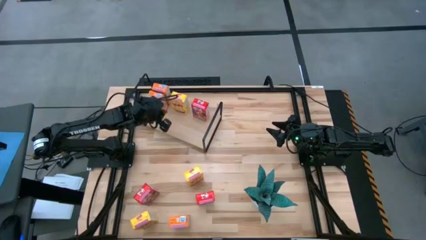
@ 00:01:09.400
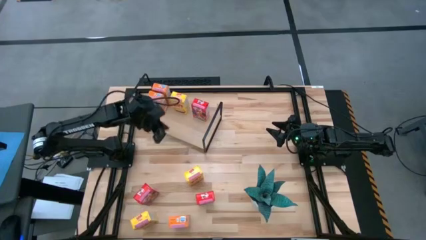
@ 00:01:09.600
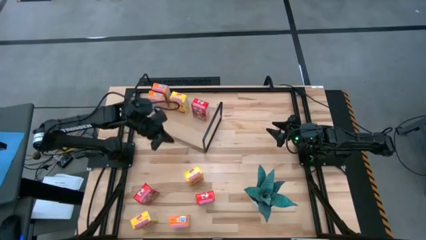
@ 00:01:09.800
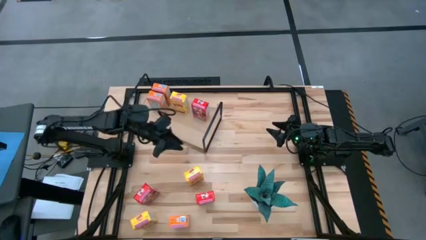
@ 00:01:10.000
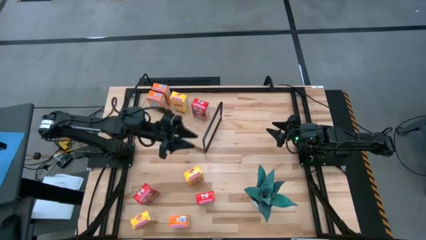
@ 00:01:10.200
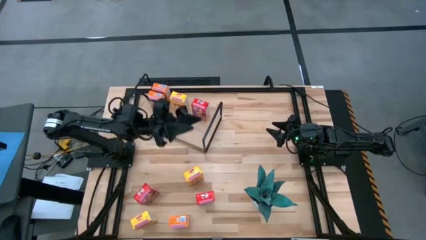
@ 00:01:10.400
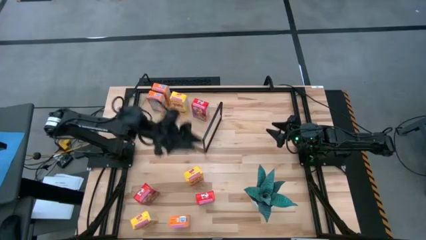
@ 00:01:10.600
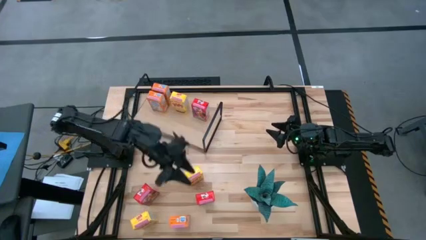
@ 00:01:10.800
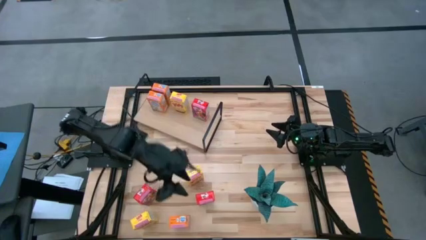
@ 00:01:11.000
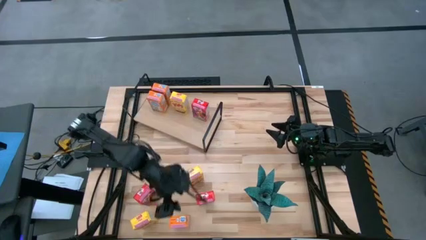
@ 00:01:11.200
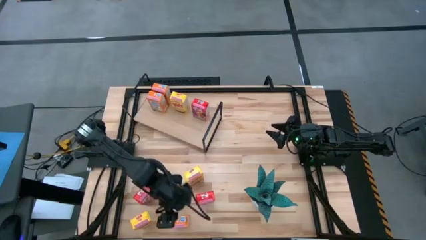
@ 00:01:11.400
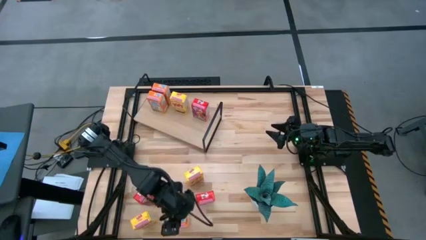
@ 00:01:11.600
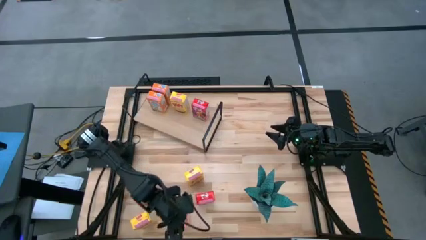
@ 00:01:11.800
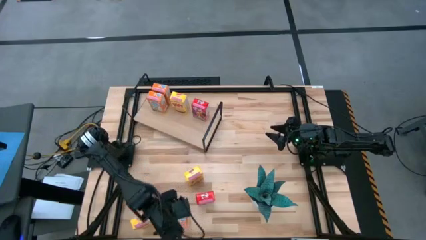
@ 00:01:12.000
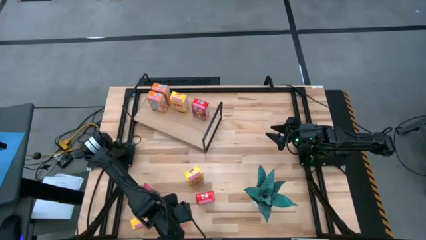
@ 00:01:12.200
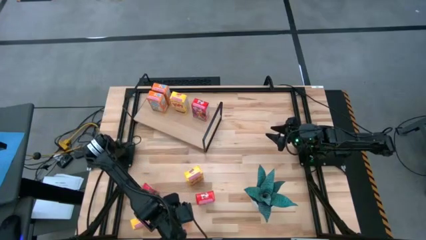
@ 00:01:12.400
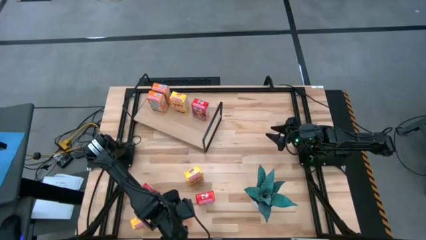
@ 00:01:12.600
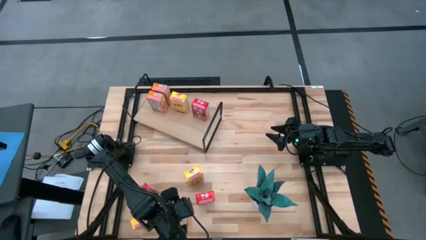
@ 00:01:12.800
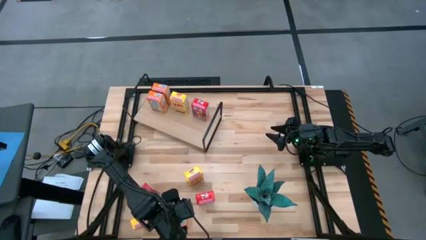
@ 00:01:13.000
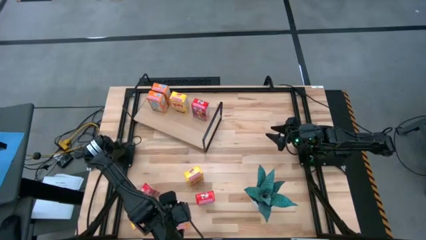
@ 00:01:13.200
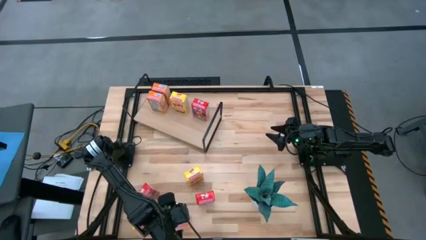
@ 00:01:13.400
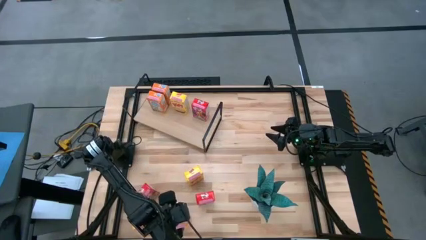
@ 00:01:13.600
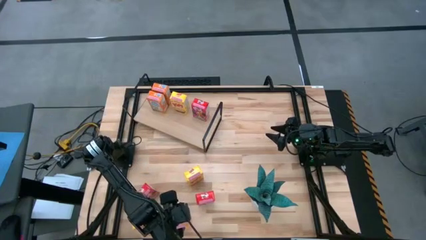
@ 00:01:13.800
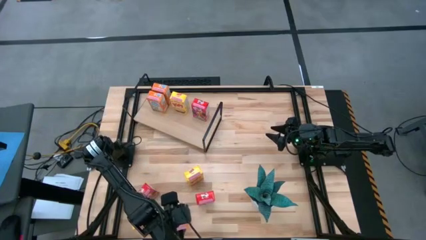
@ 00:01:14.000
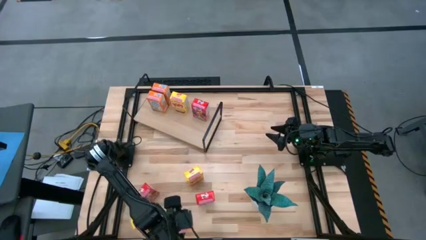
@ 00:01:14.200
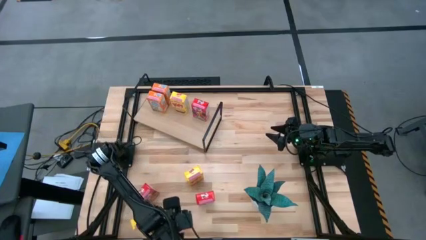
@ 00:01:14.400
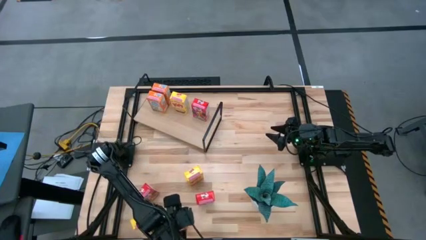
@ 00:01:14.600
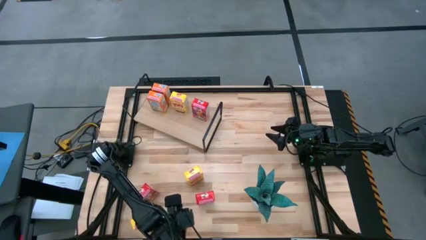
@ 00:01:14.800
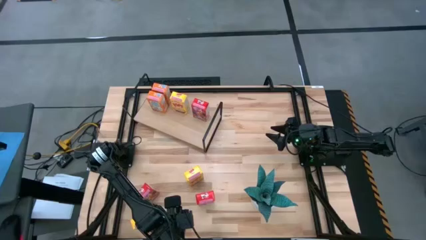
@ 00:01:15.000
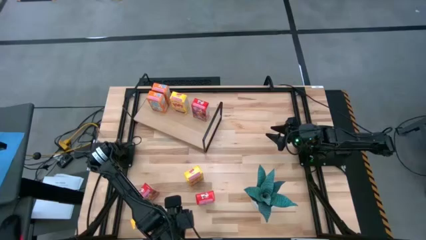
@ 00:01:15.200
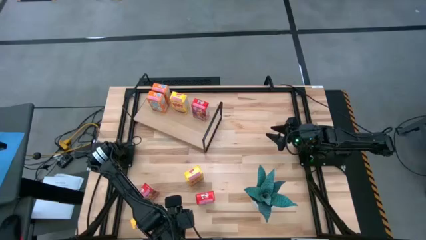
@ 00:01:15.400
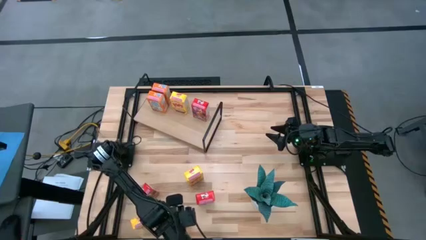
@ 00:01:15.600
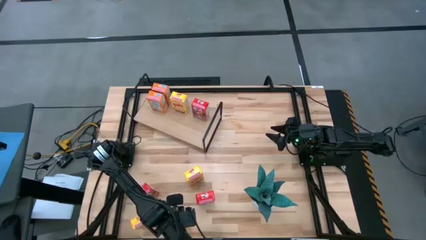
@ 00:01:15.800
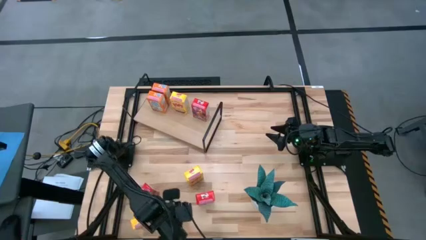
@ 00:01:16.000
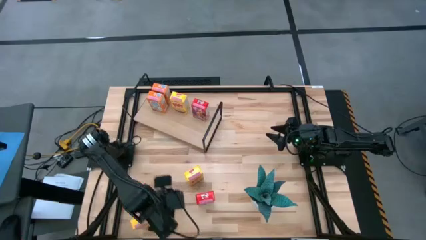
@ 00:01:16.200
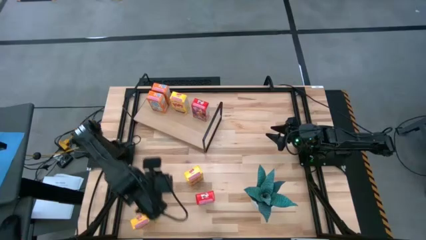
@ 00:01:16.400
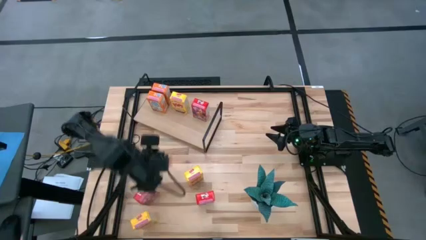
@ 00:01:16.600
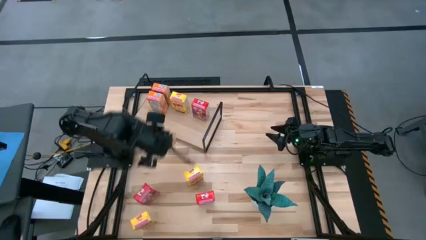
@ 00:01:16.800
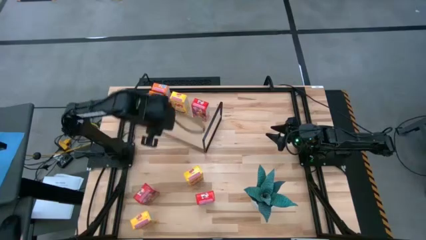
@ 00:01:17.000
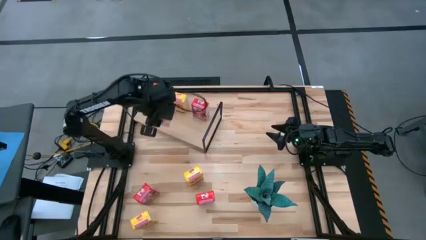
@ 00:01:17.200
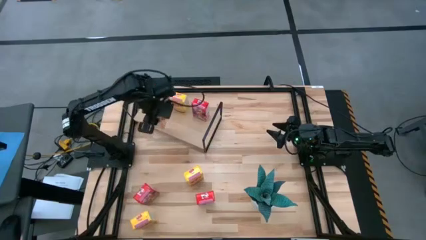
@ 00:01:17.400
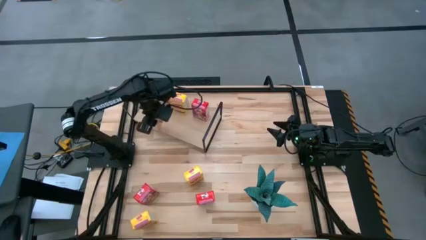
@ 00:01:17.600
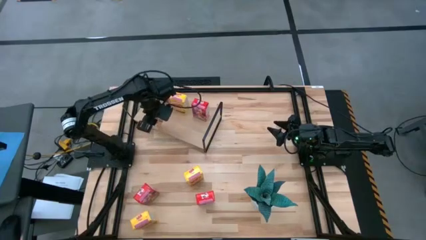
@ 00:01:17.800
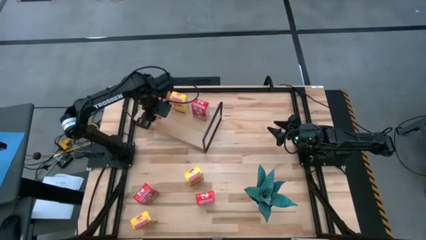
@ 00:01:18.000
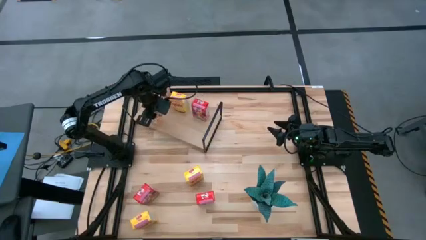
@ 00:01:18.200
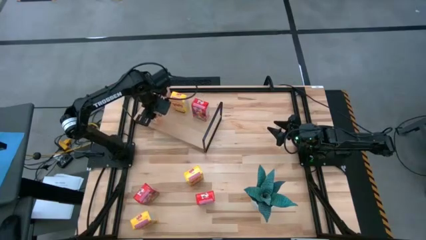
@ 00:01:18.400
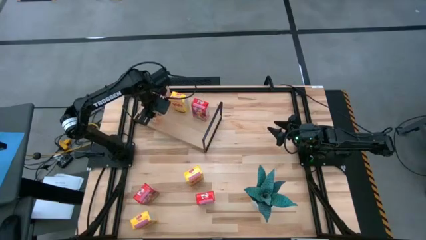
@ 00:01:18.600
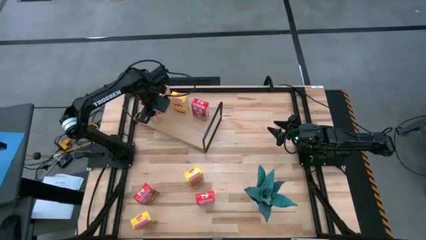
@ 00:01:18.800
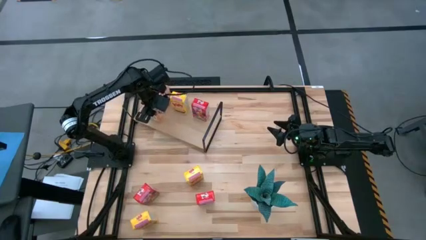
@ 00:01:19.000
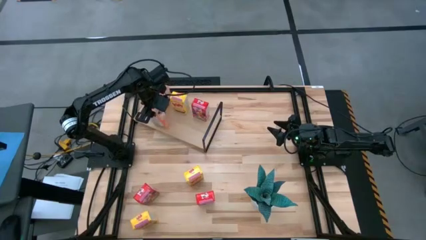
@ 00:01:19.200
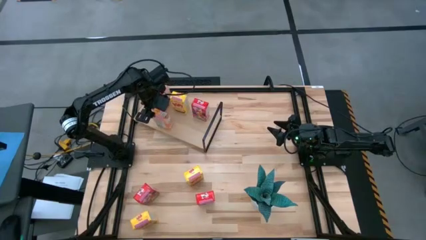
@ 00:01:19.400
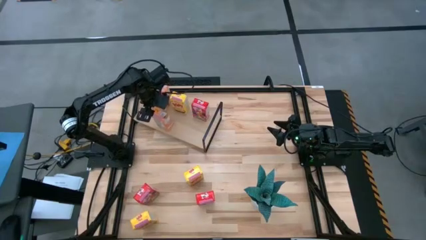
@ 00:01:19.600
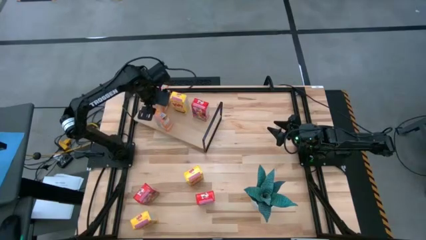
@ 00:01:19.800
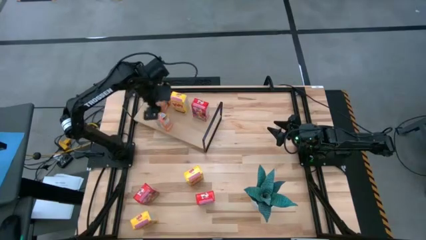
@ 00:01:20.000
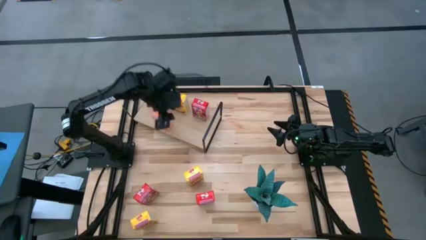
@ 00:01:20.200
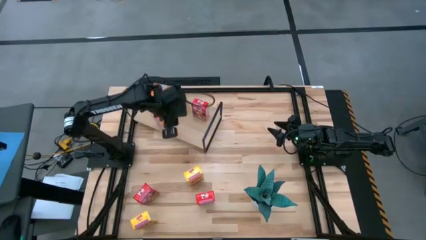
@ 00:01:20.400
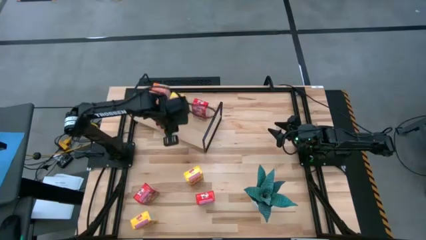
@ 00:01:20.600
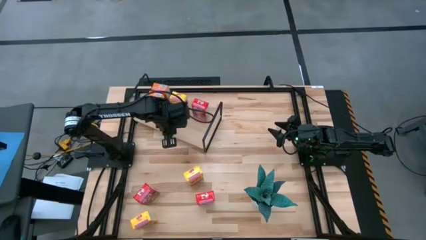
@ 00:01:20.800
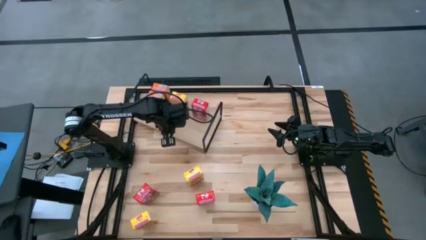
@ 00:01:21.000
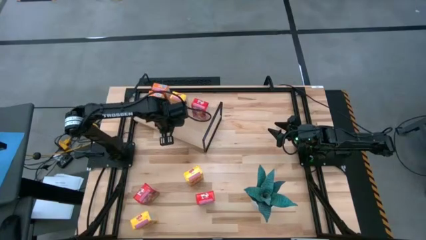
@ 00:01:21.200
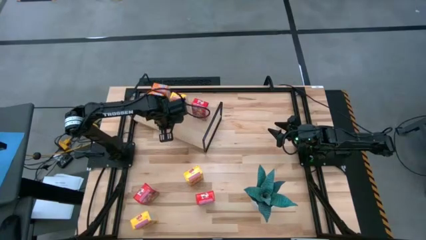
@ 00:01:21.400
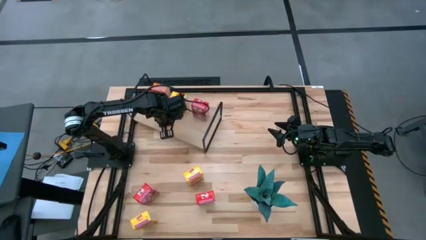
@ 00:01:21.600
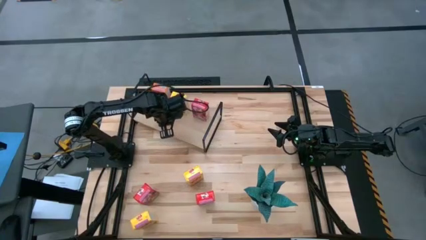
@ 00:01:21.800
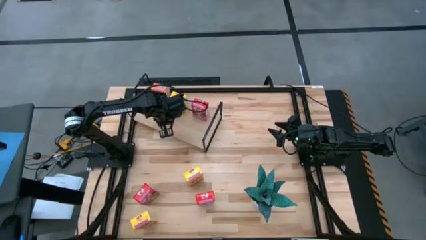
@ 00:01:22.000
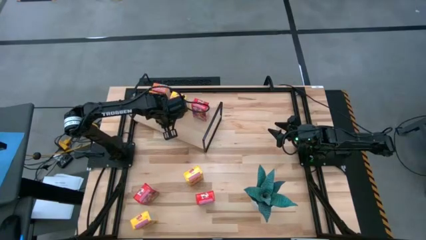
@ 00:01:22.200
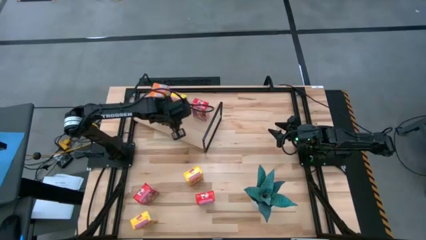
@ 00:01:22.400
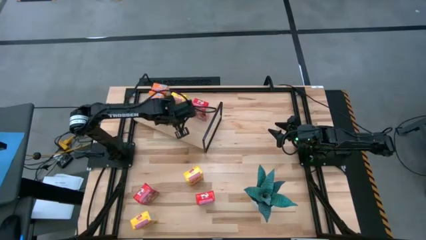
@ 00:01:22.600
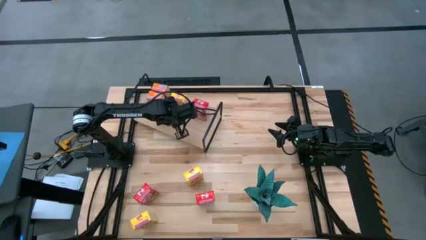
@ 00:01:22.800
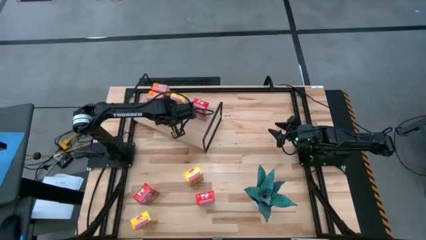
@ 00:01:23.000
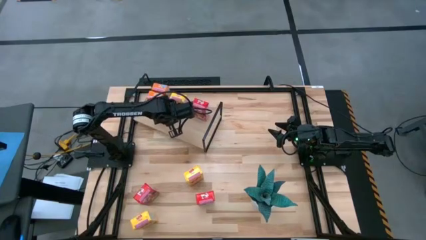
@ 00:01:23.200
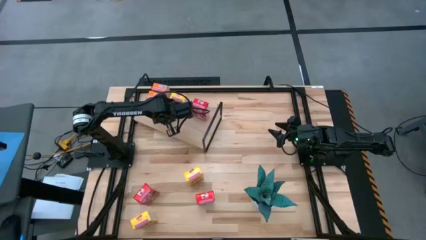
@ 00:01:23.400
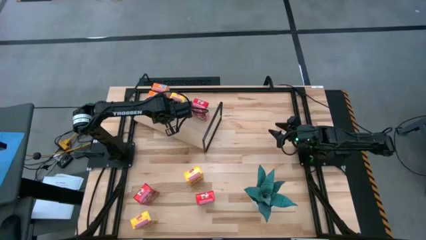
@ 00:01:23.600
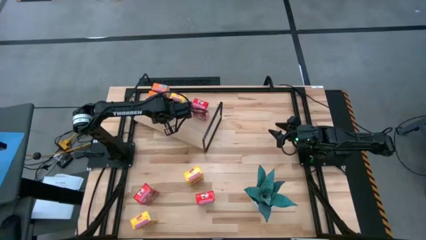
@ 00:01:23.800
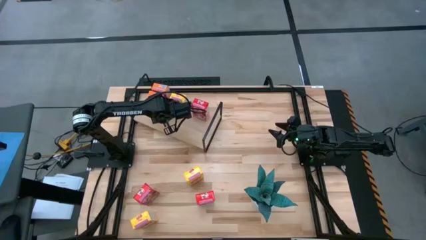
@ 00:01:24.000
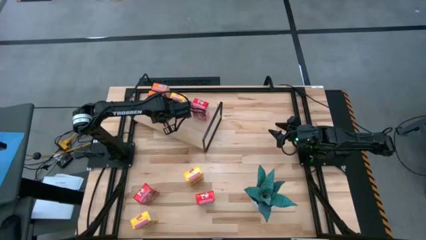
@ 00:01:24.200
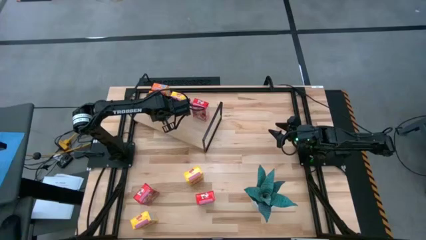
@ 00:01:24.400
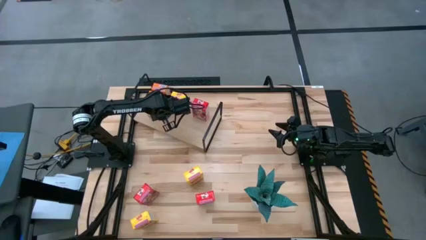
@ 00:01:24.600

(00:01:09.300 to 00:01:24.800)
Task: Stack cereal on shelf
Put the orange cereal box aligned with the other orange cereal boxes on the shelf
